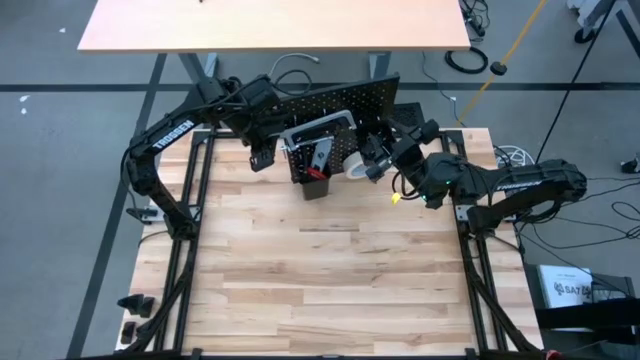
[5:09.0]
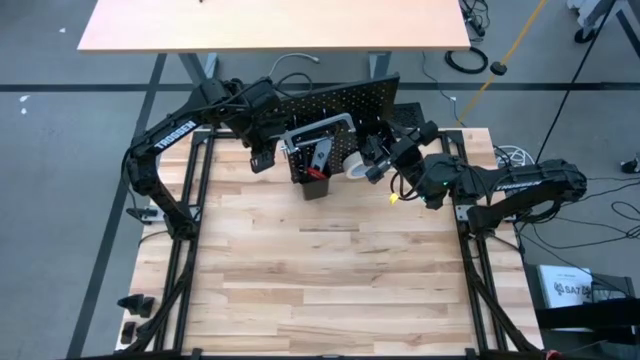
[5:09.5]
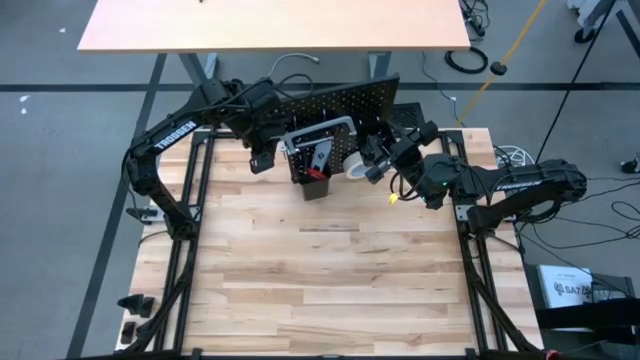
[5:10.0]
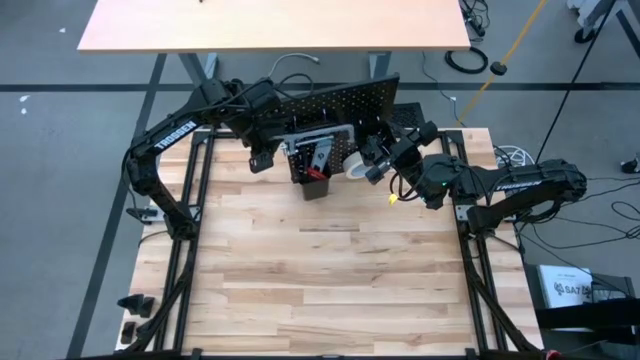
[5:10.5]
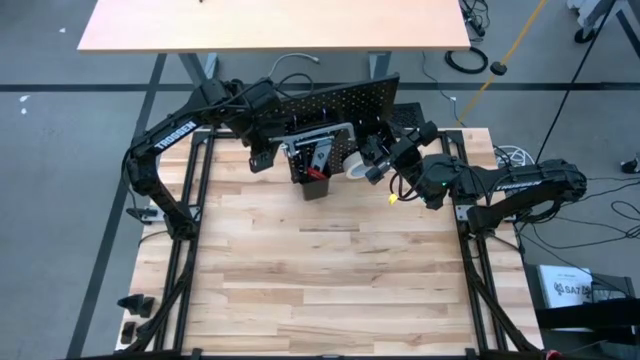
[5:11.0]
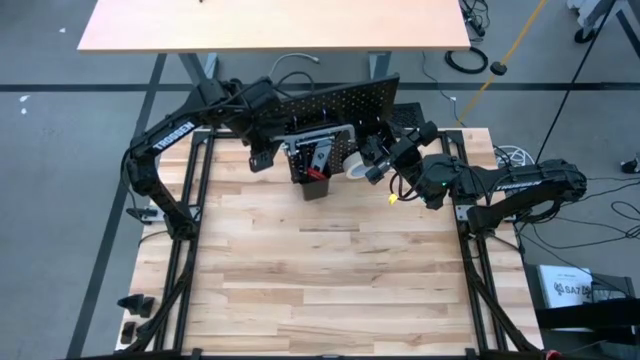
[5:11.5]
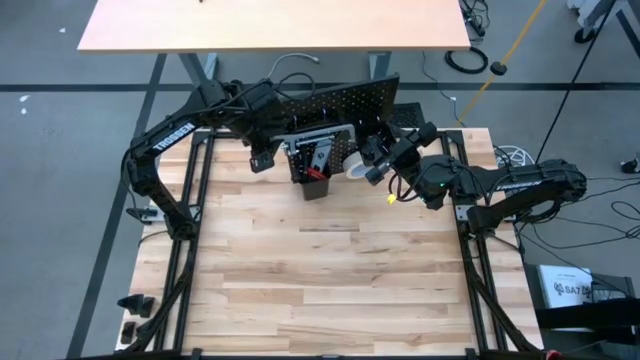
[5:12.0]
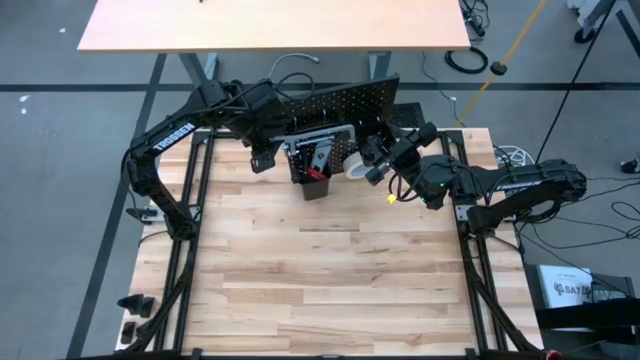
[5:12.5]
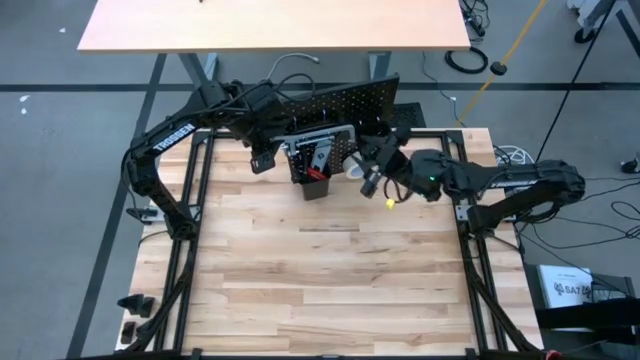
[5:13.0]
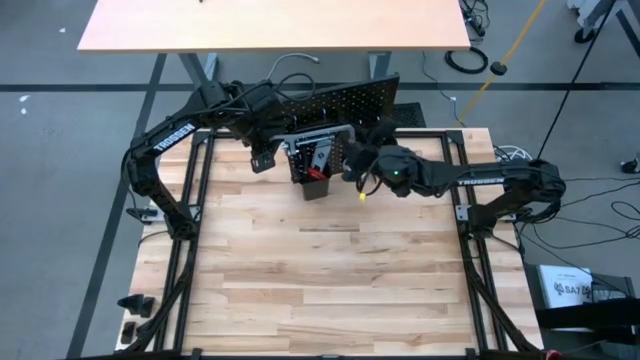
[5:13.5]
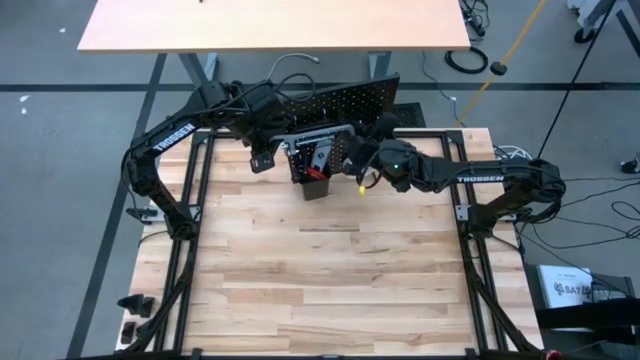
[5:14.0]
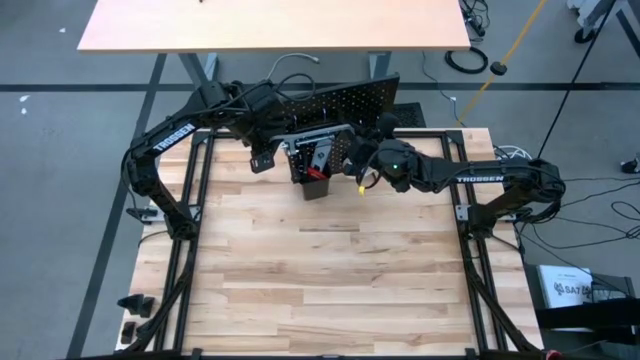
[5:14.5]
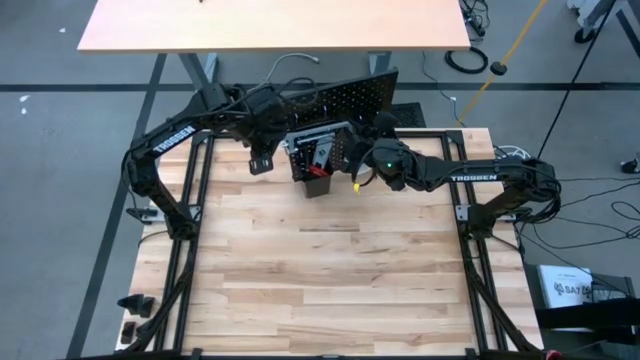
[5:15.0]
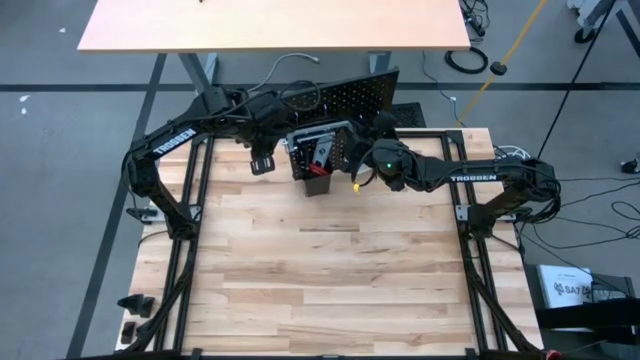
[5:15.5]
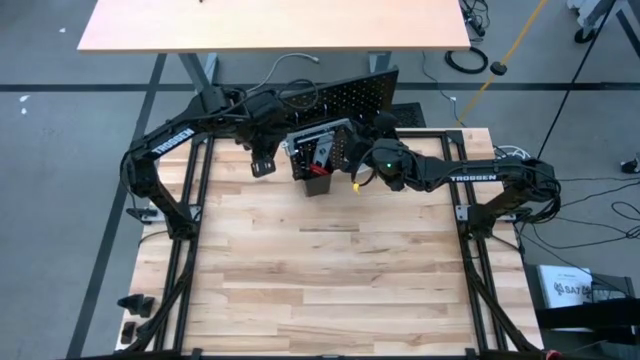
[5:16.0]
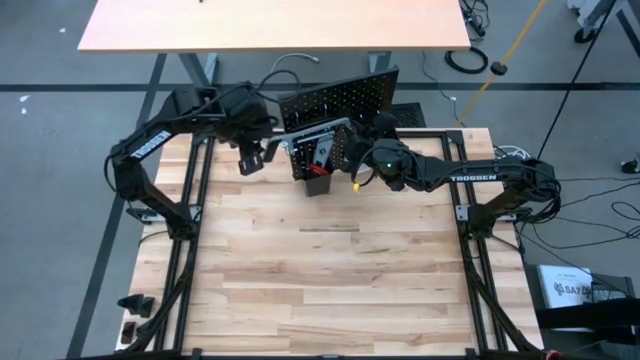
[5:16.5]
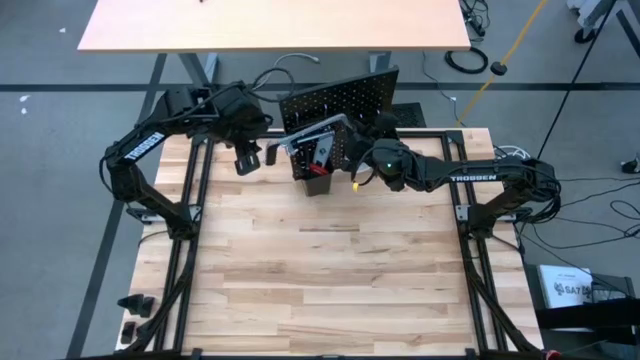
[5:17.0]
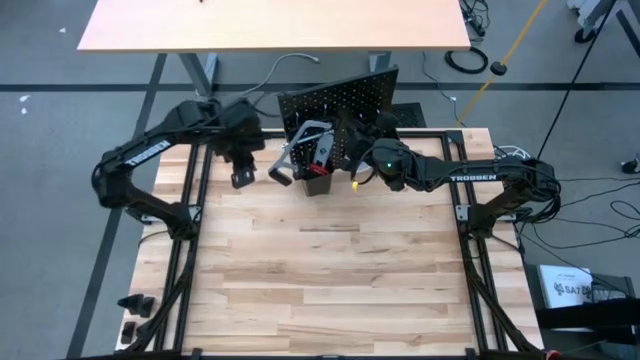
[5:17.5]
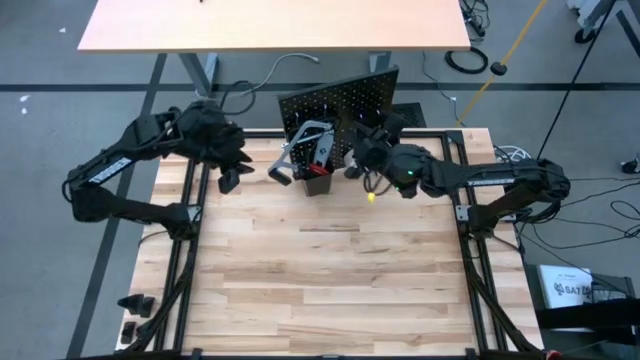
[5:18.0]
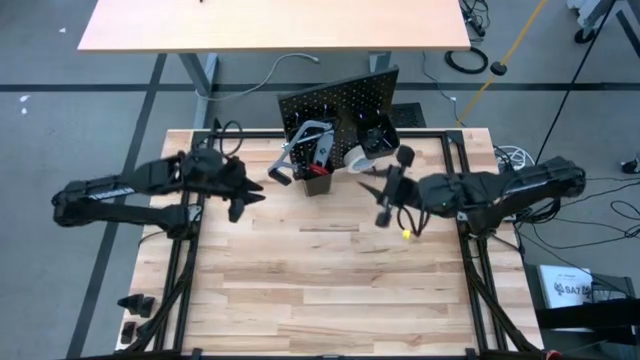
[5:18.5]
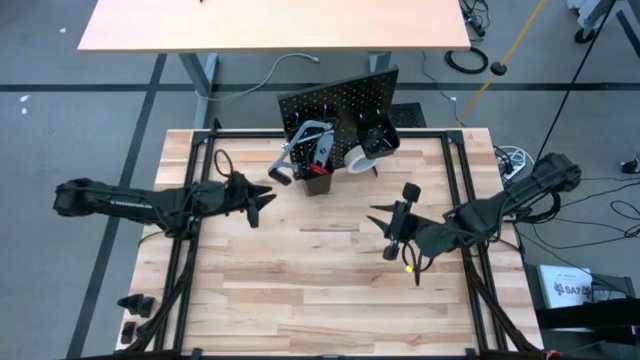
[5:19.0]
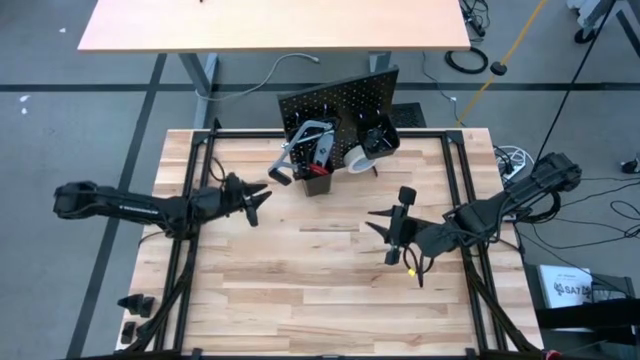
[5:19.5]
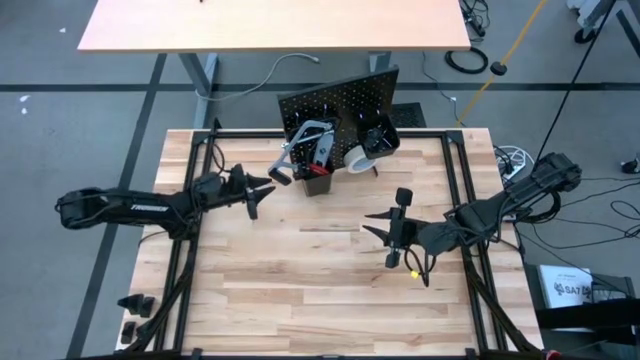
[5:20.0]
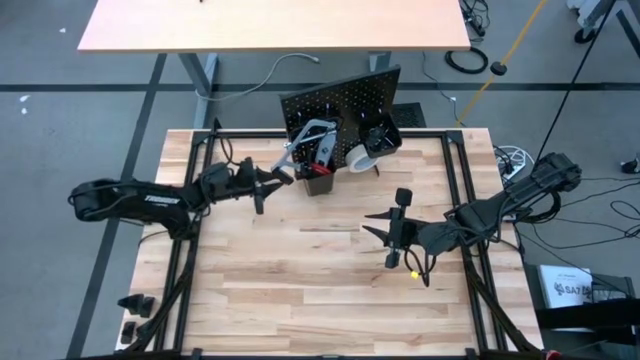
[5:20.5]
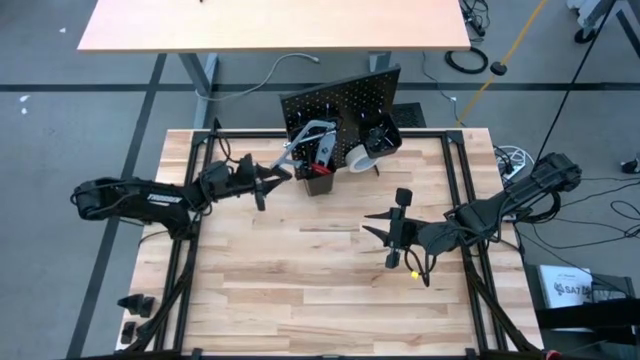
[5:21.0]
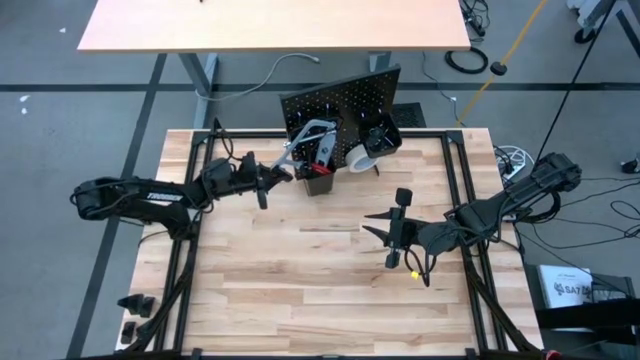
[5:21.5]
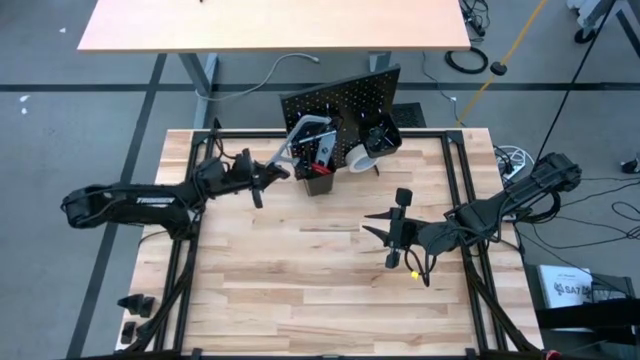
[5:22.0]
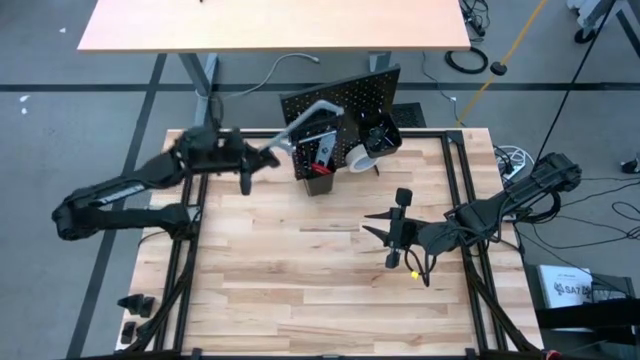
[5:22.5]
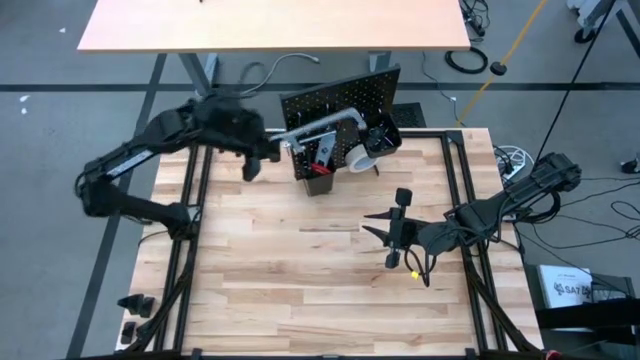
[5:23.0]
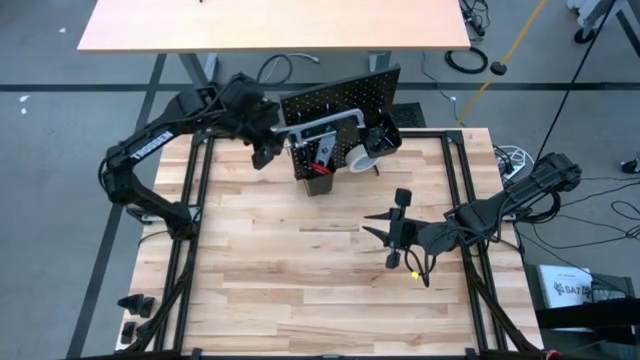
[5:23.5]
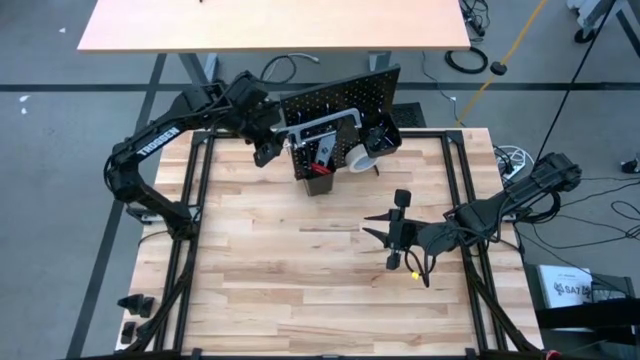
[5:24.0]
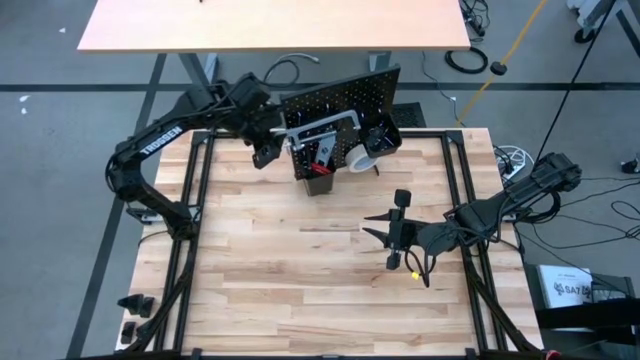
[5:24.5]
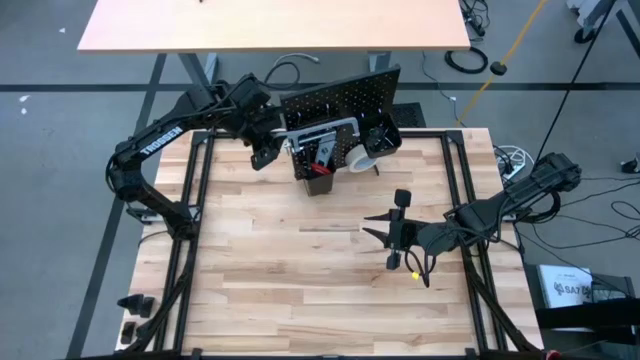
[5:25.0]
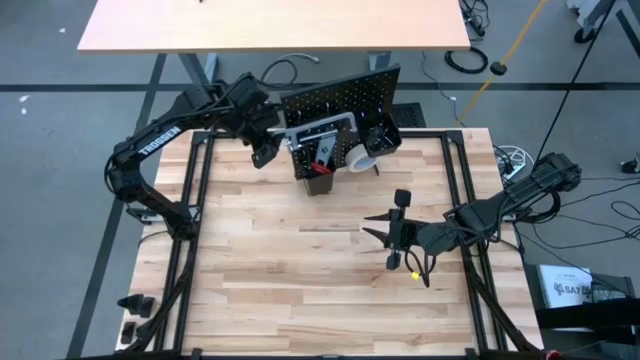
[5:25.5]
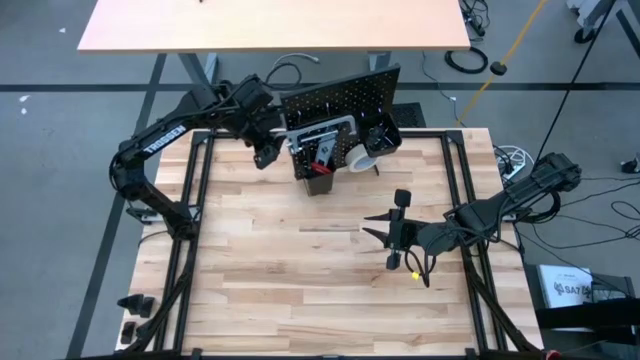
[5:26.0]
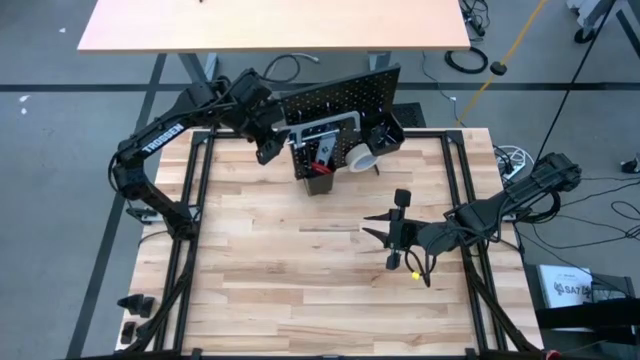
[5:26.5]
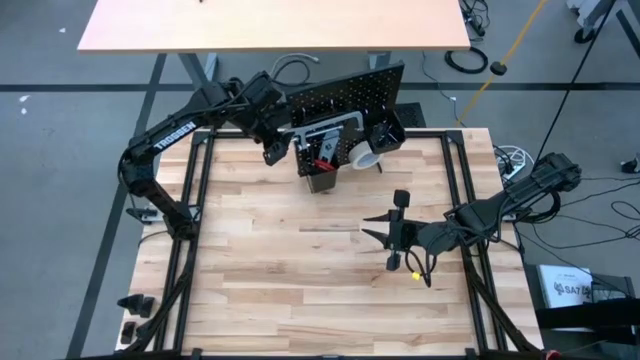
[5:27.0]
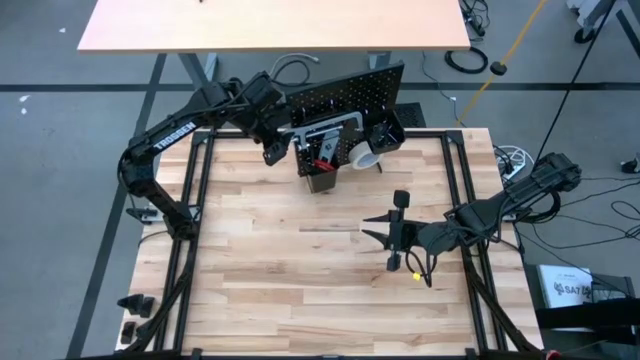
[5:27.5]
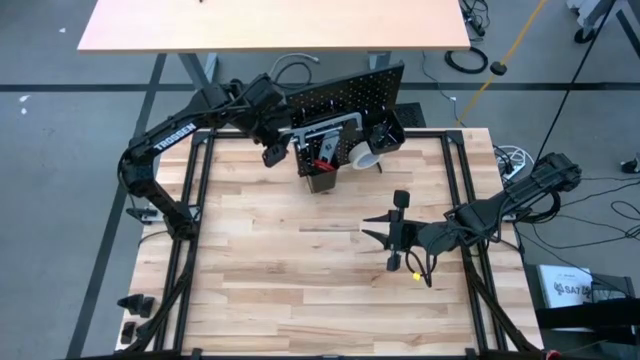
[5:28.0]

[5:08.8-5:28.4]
Task: Hang tools onto peg board
Hang the hacksaw on the pegboard

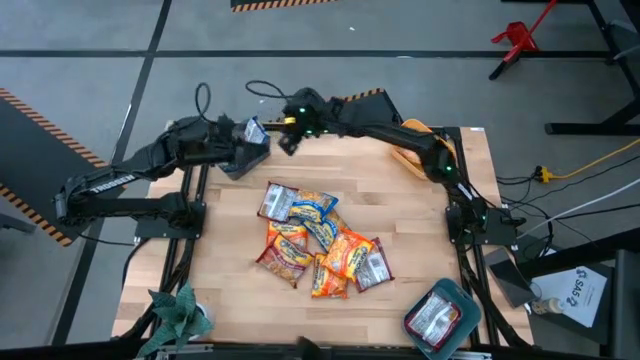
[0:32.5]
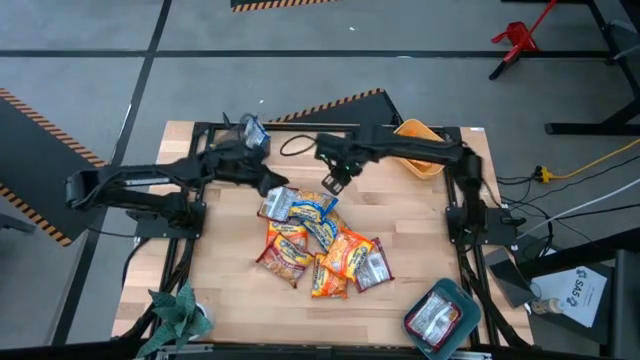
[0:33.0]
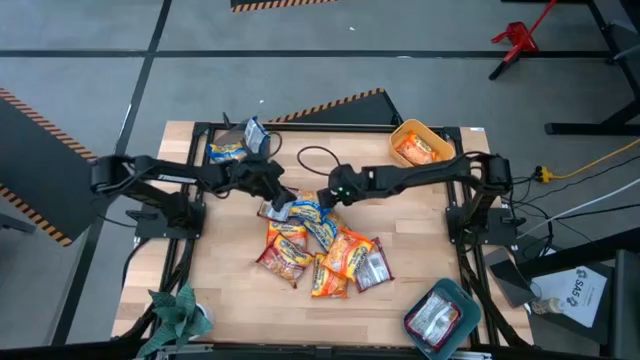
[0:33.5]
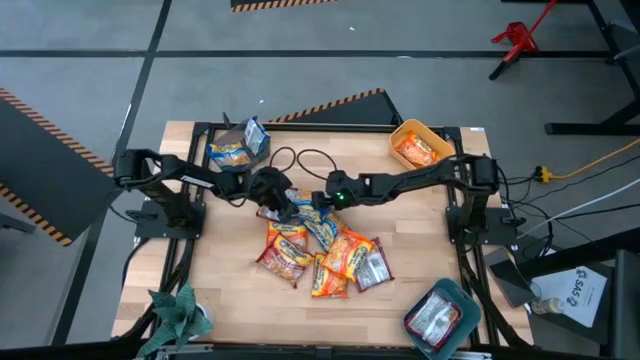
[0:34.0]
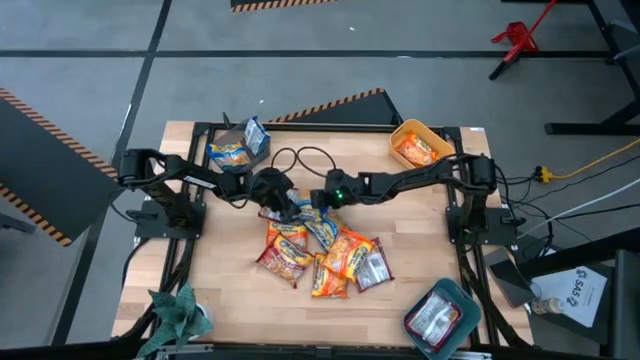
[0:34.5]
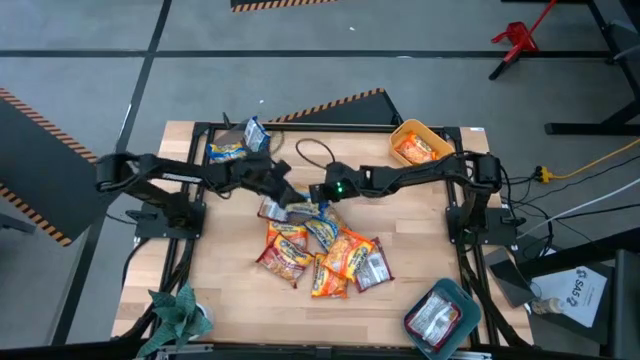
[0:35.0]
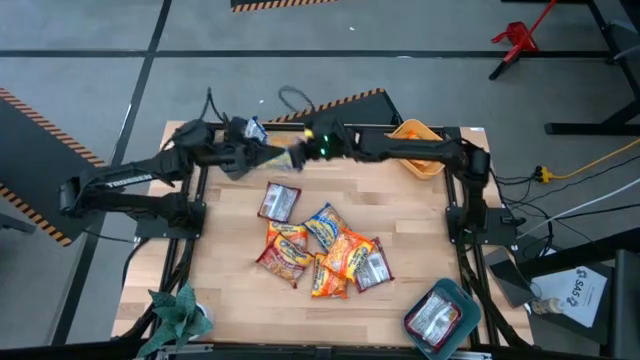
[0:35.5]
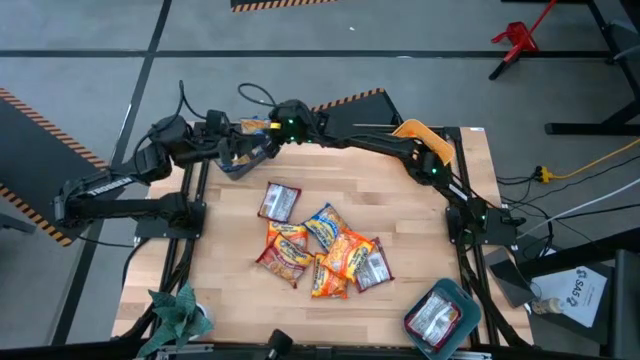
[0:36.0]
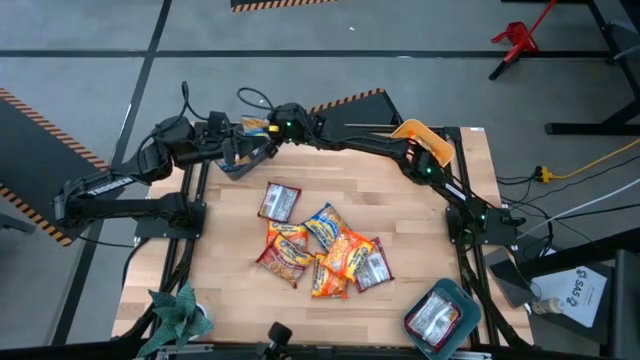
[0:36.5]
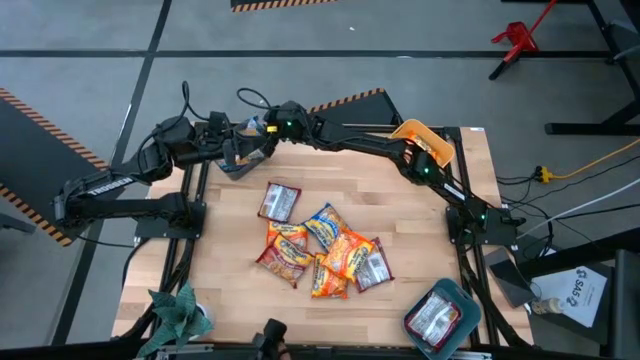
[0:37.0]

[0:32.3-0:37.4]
Task: Sort Maruchan noodles
Put the blue noodle pack into the black bin
